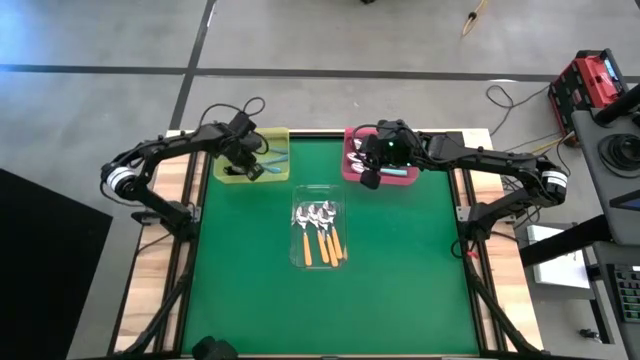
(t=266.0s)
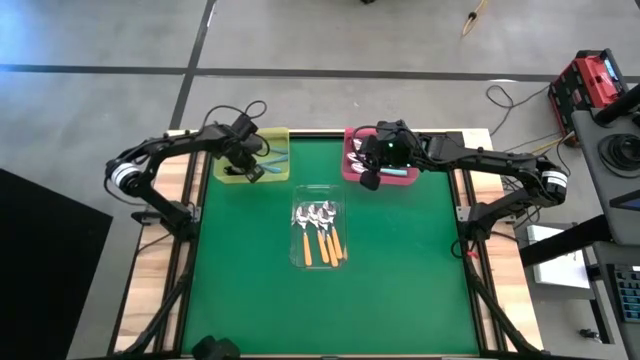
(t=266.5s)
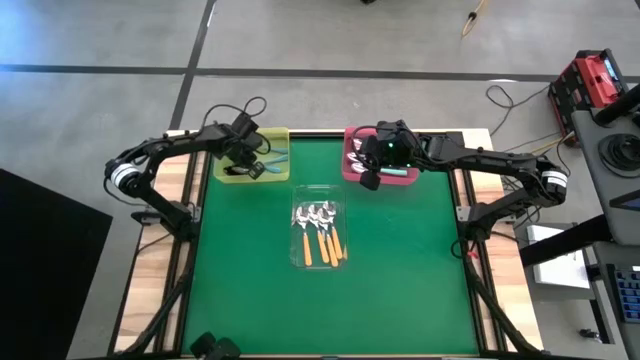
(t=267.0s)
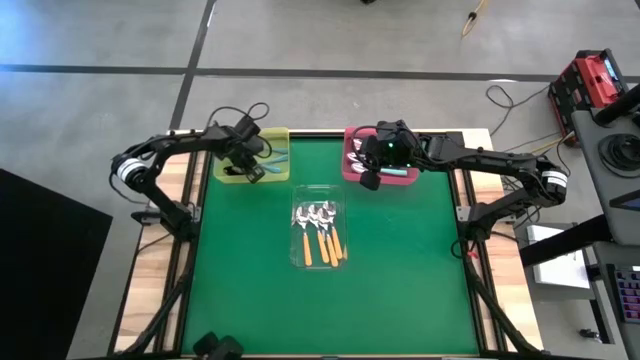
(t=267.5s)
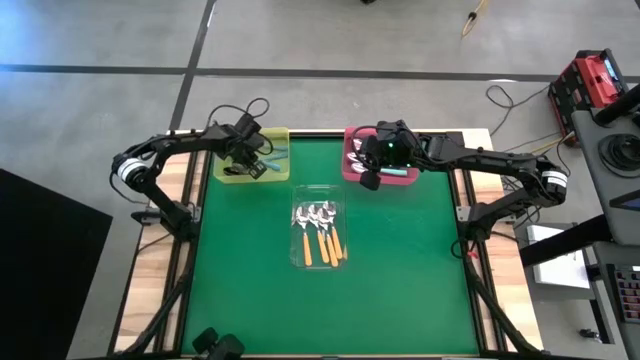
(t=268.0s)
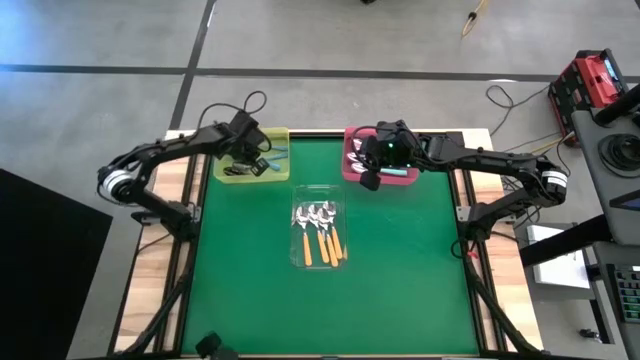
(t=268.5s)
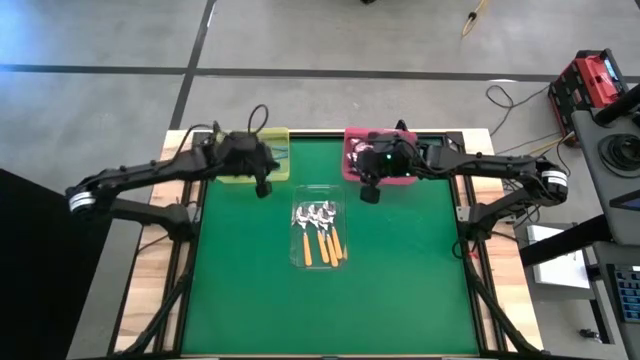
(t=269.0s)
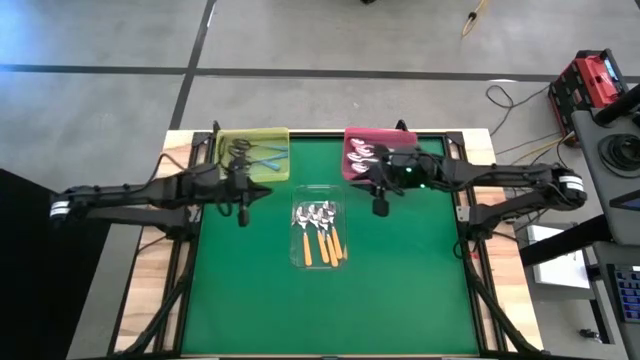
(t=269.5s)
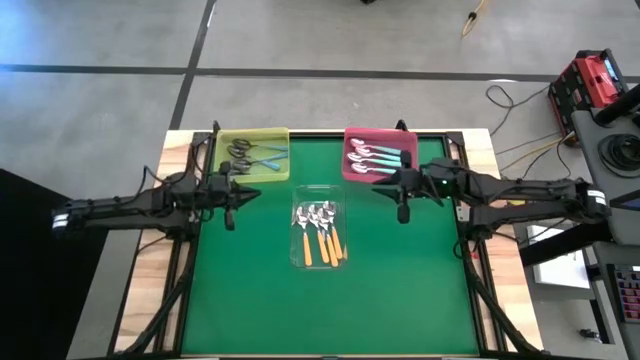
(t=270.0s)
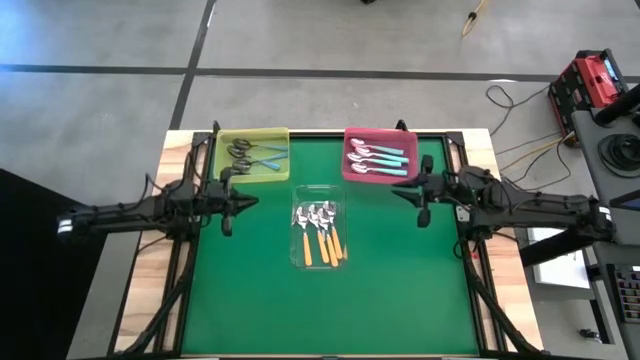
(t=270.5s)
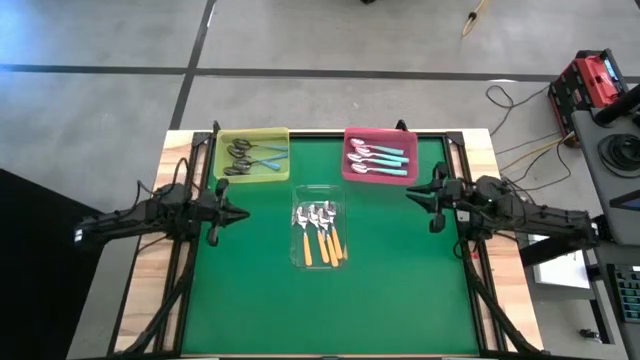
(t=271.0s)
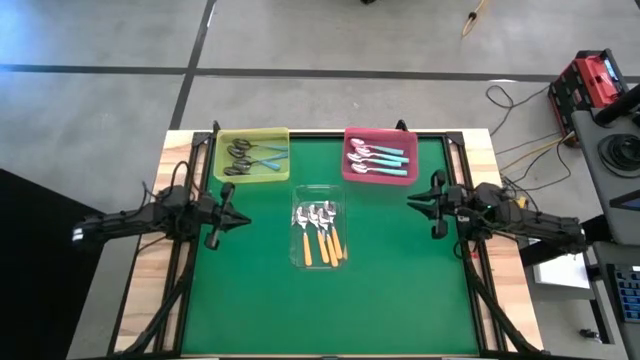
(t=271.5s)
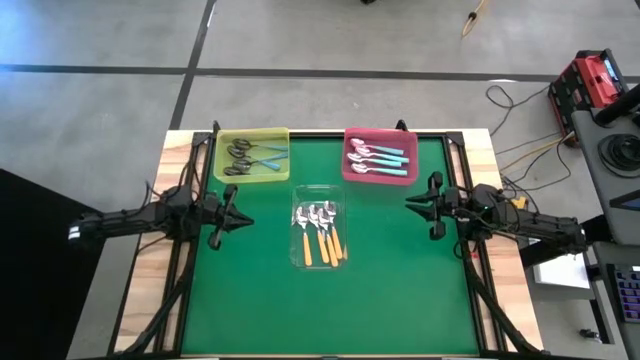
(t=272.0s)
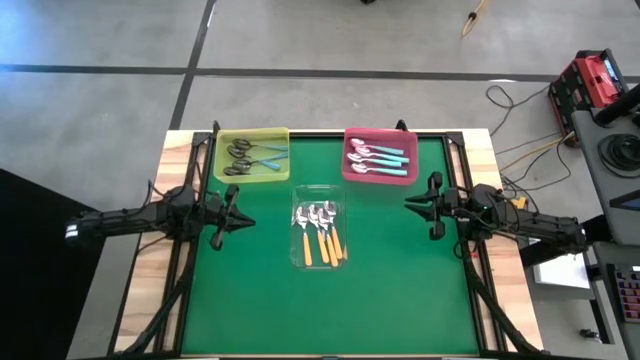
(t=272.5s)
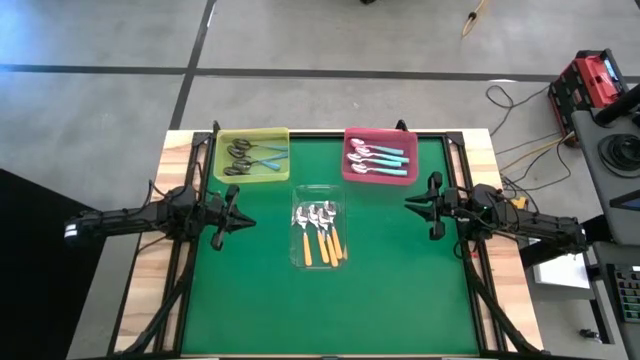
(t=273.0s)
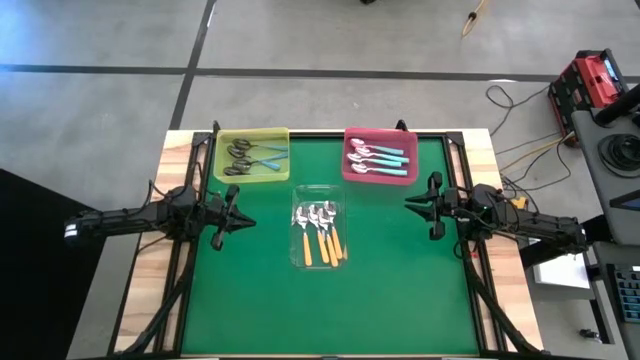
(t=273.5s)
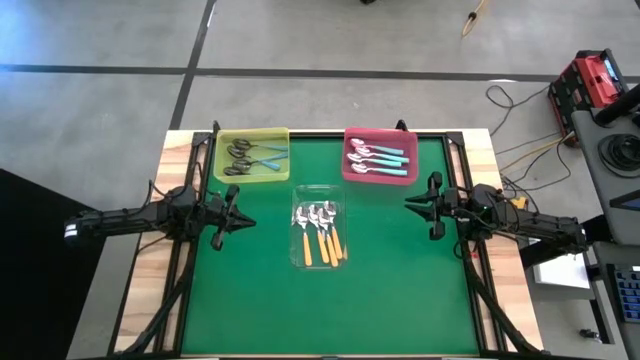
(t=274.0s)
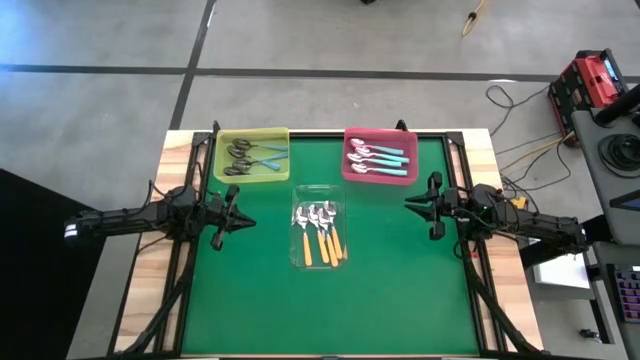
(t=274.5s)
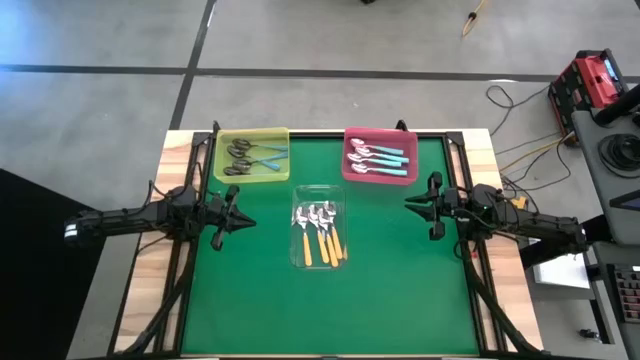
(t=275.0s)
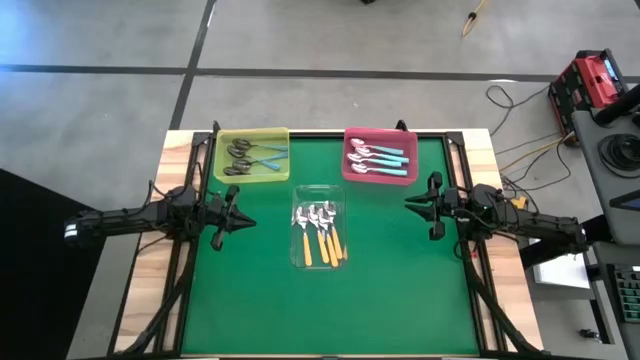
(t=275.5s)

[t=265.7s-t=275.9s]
Task: Sort silverware by color (type)
Return to Home Position

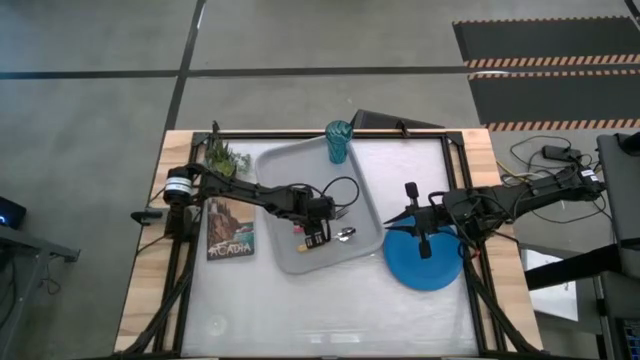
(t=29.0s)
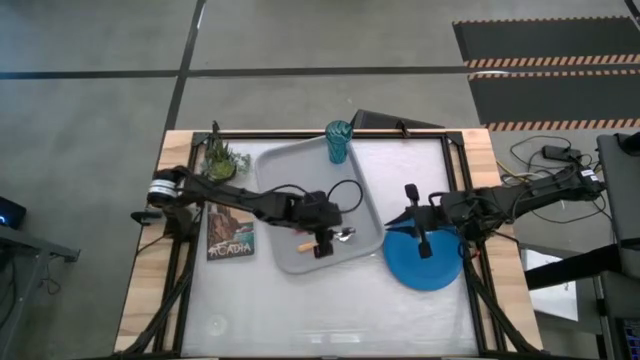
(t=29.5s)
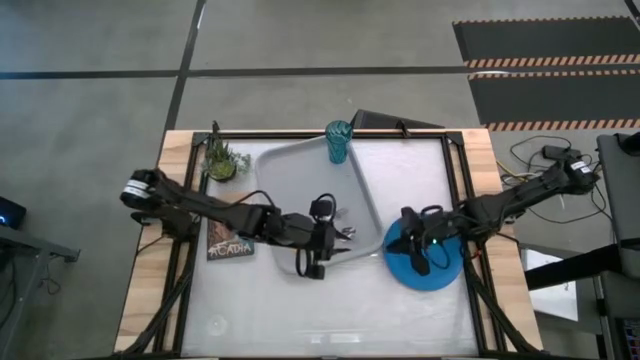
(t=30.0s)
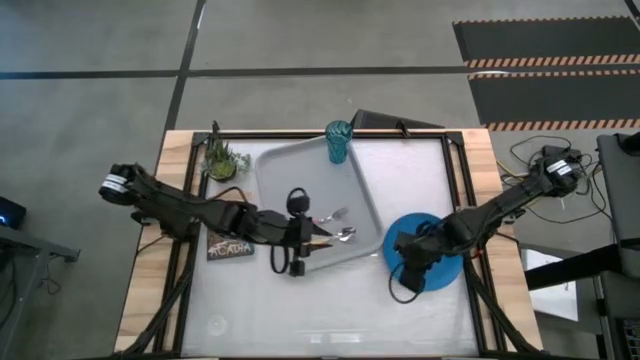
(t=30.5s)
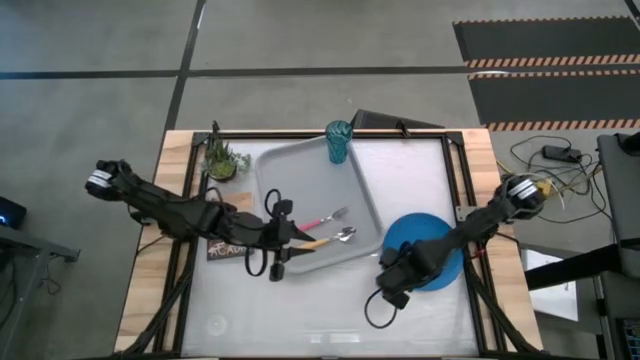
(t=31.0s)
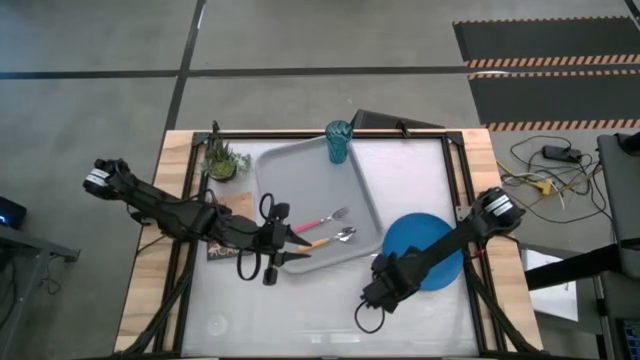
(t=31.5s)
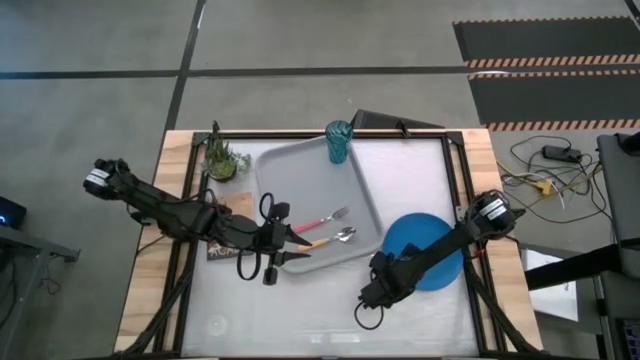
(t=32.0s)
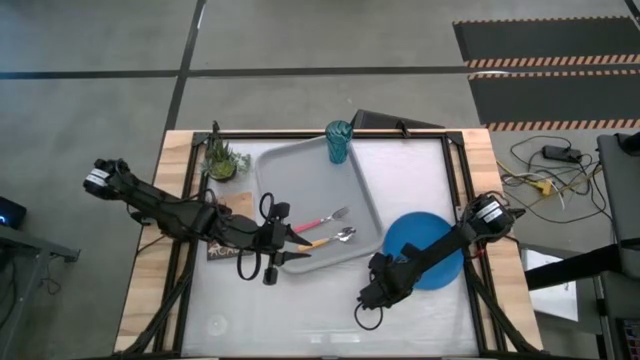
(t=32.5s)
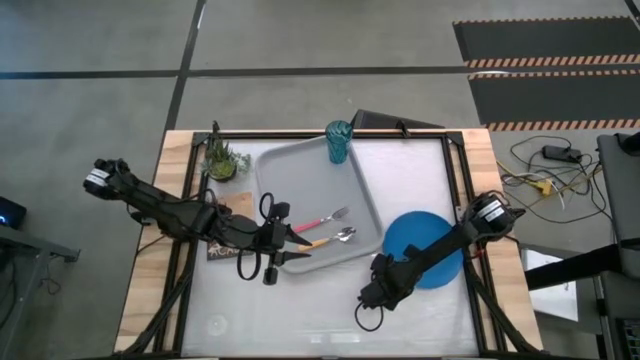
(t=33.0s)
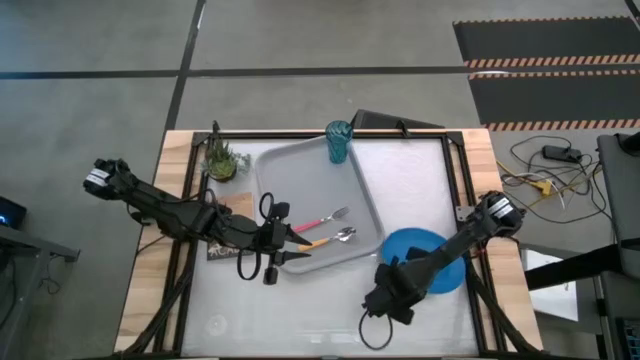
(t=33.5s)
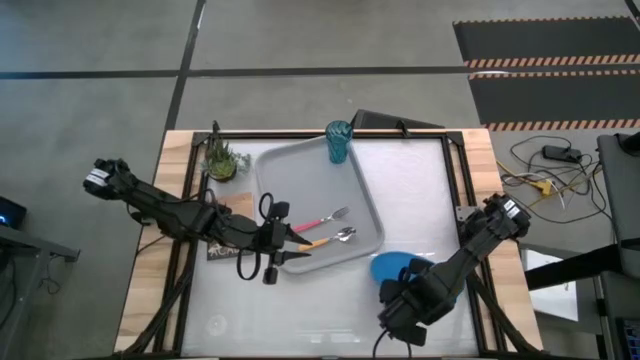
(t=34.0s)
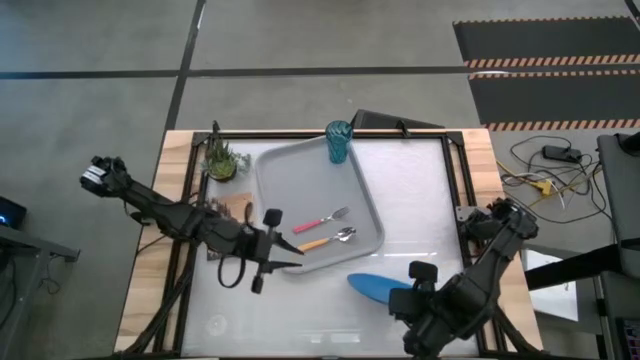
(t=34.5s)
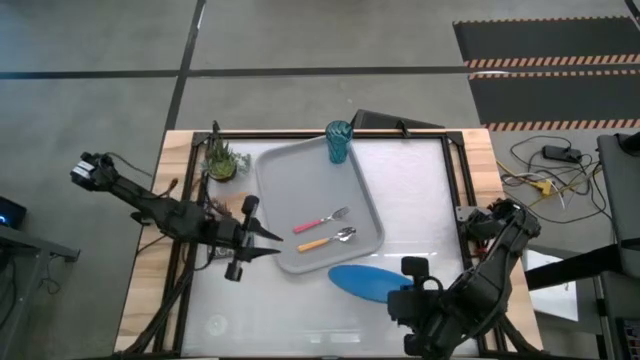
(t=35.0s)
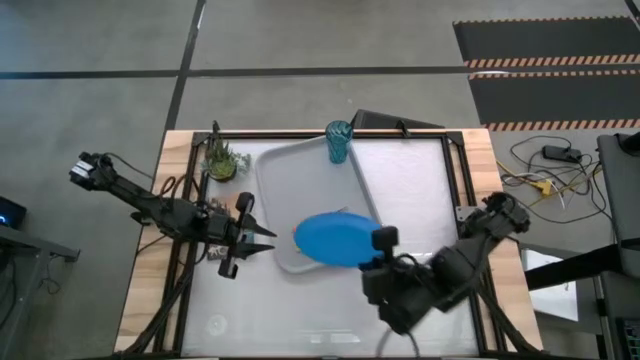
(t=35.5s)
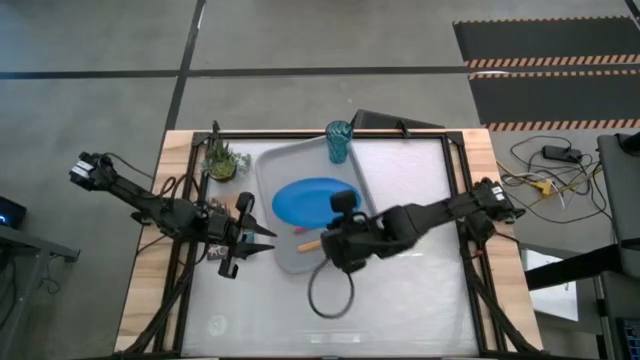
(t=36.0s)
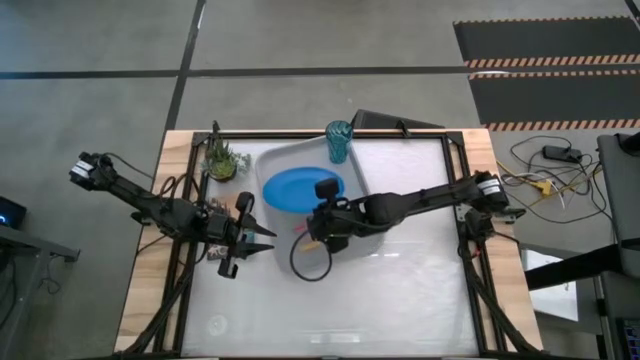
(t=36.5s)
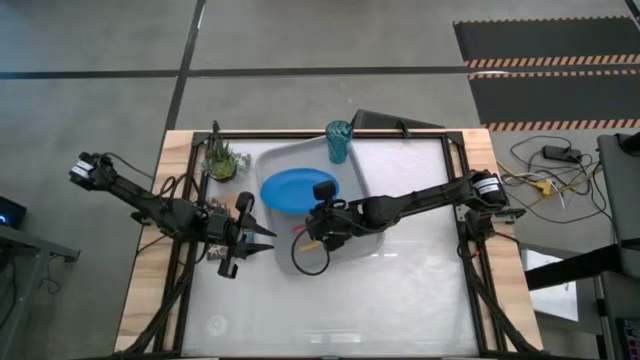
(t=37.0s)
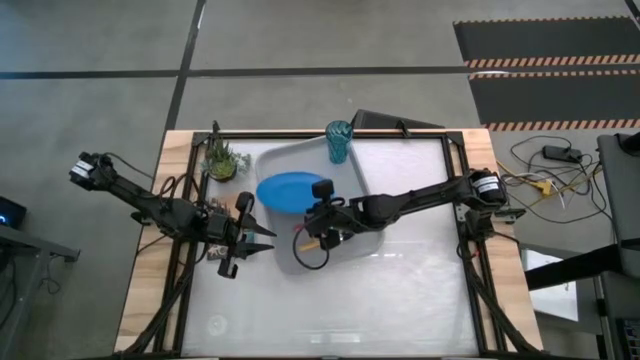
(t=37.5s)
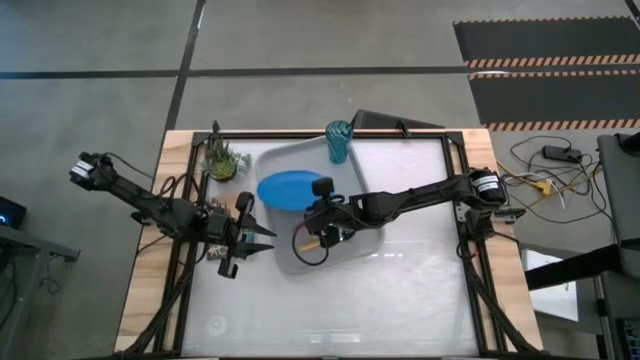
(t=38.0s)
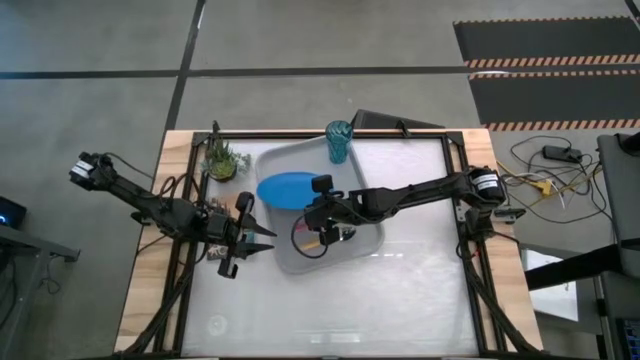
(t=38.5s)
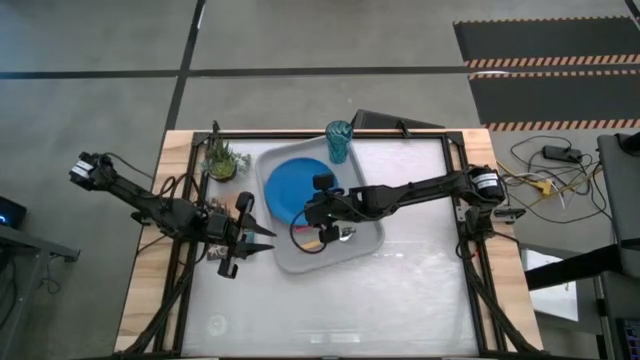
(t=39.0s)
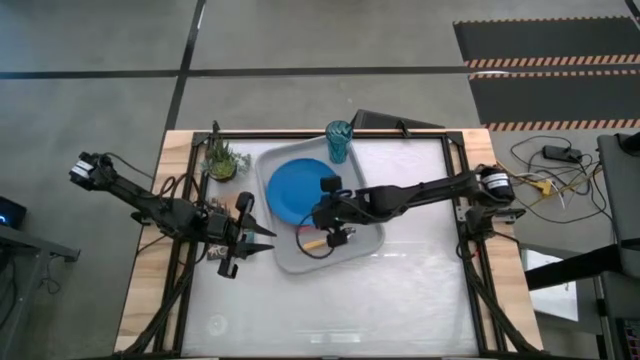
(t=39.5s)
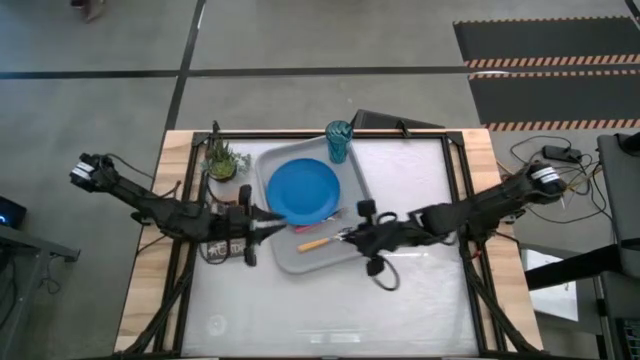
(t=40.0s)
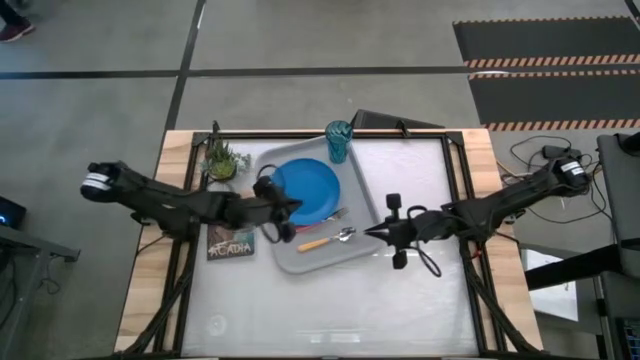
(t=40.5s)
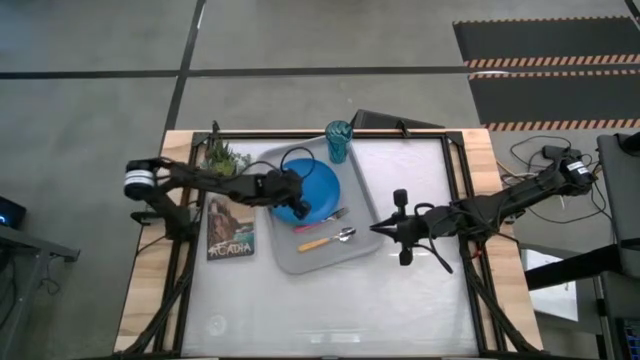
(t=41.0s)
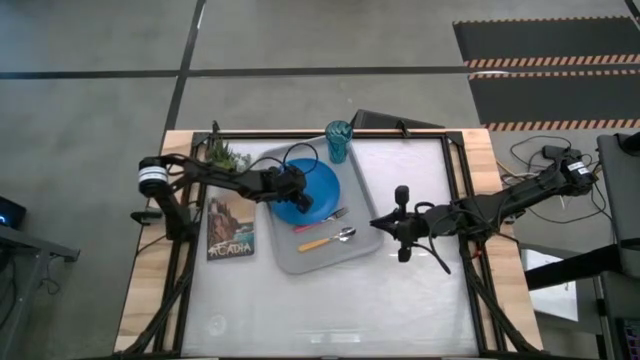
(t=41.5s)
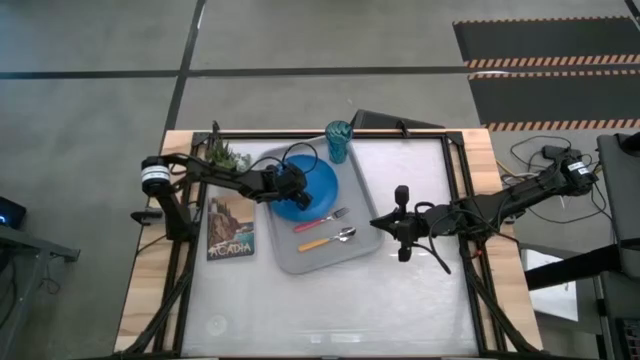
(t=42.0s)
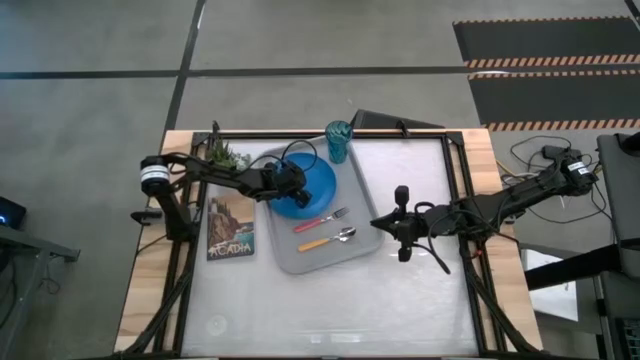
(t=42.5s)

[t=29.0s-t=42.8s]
Task: Pick and place plate/cup/fork/spoon on tray
Put the blue plate under the blue cup on the gray serving tray
